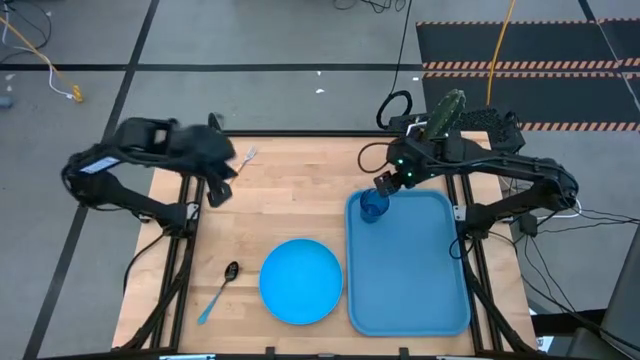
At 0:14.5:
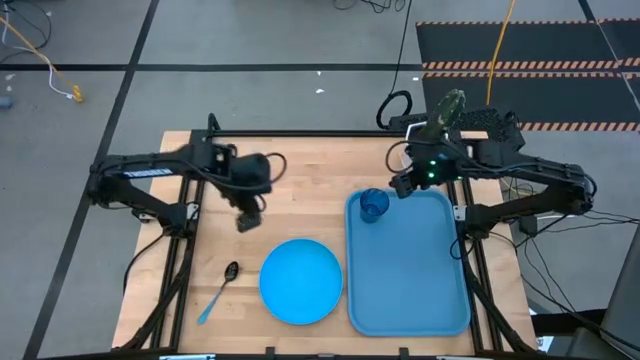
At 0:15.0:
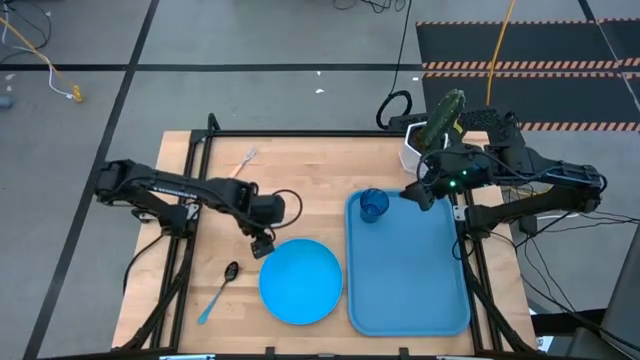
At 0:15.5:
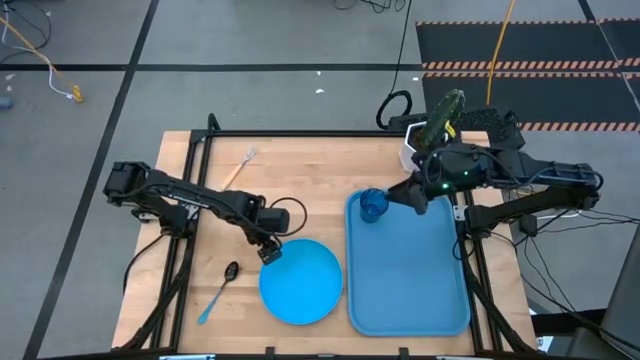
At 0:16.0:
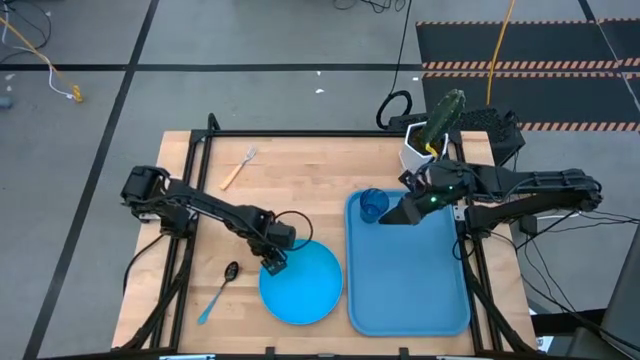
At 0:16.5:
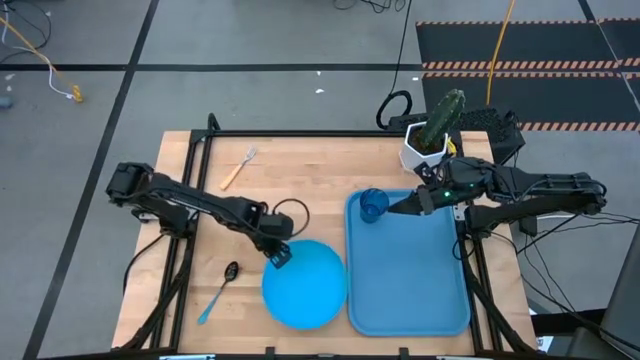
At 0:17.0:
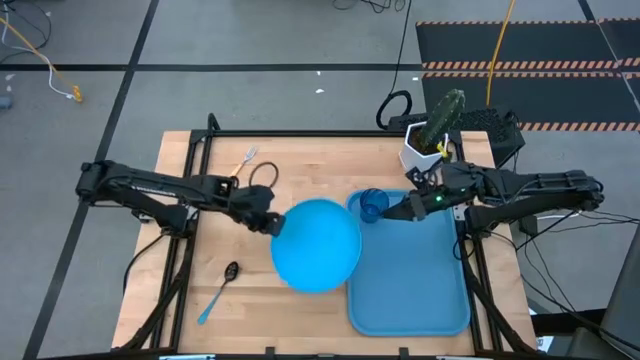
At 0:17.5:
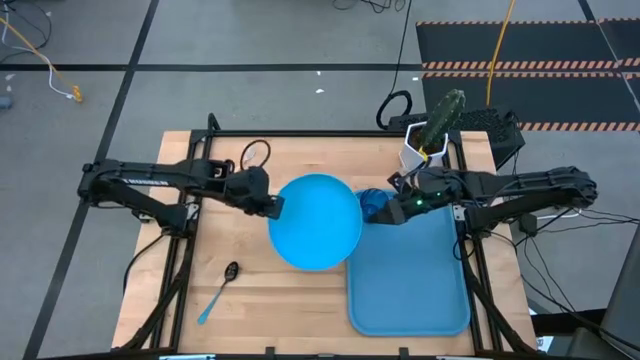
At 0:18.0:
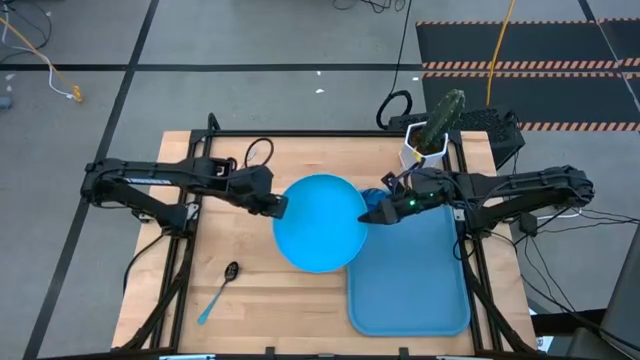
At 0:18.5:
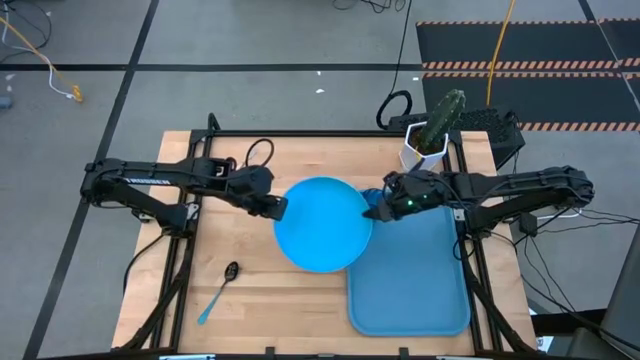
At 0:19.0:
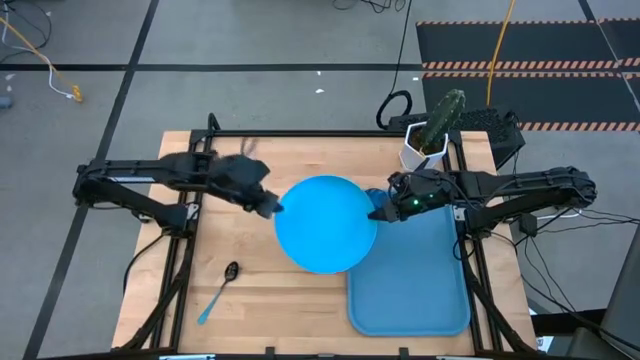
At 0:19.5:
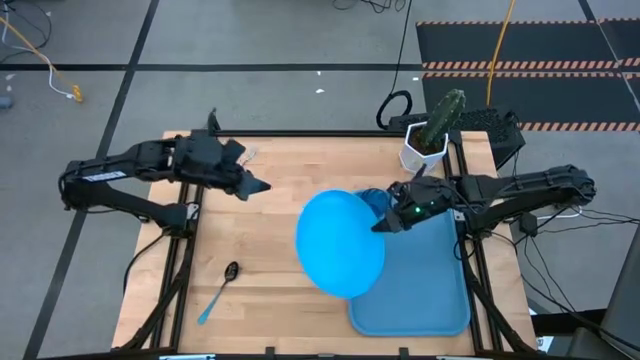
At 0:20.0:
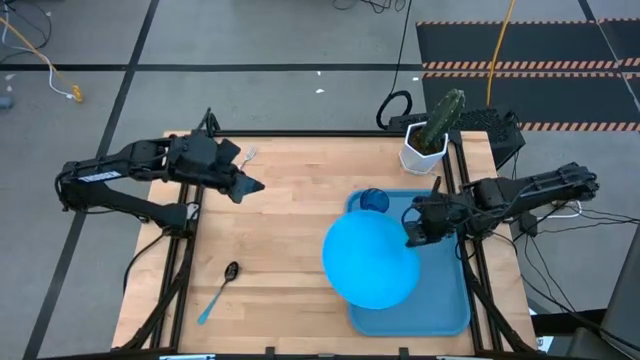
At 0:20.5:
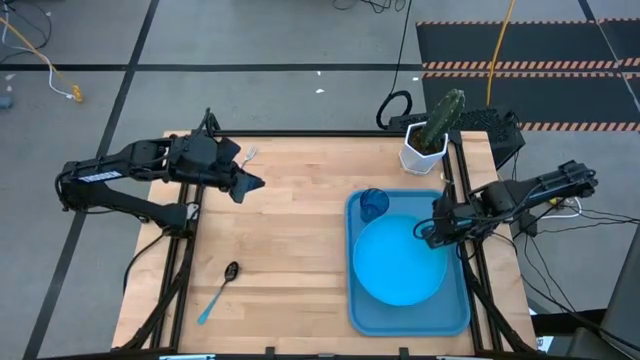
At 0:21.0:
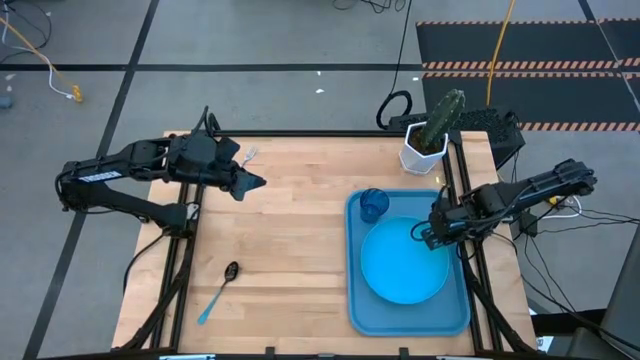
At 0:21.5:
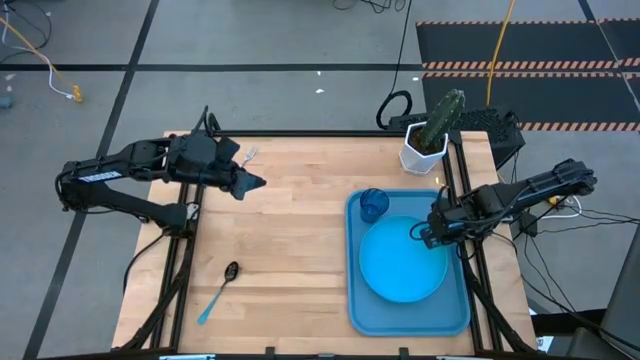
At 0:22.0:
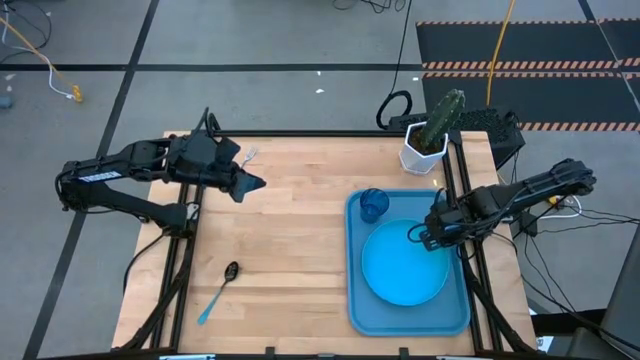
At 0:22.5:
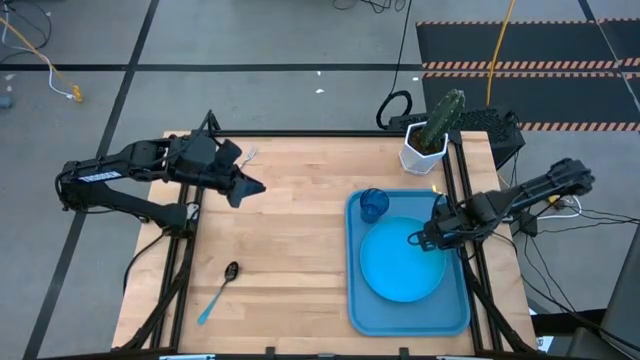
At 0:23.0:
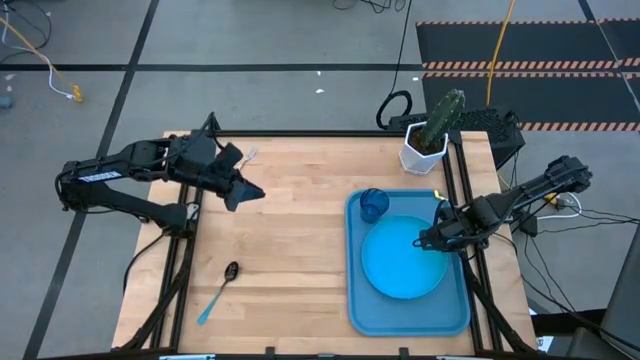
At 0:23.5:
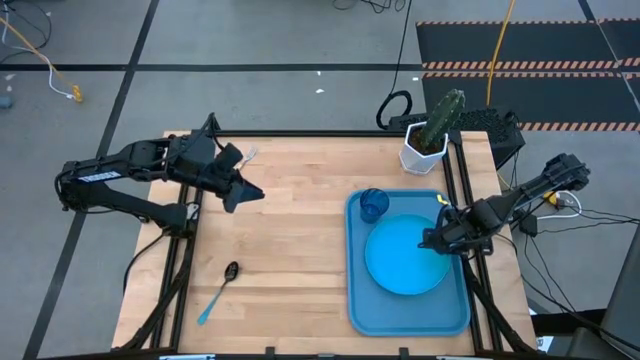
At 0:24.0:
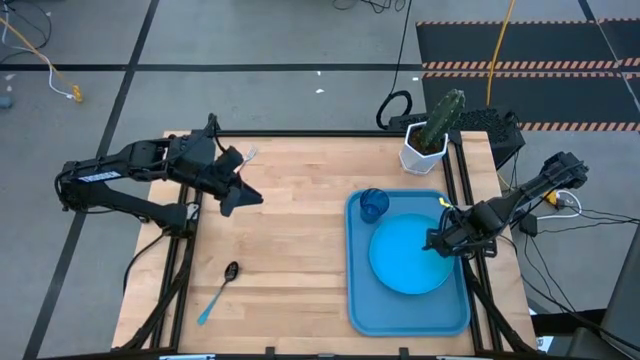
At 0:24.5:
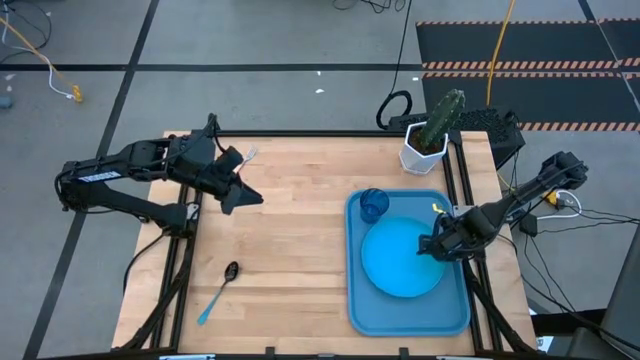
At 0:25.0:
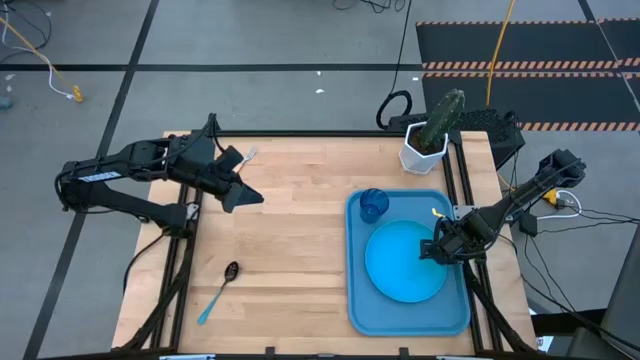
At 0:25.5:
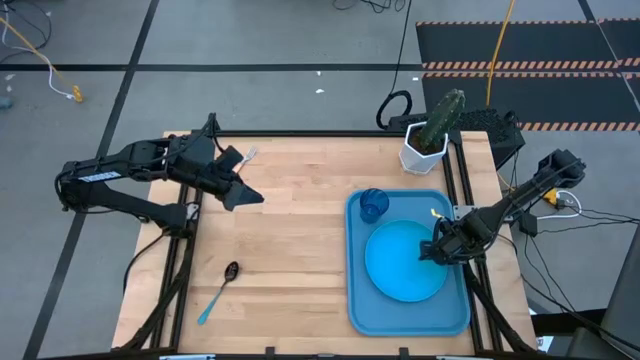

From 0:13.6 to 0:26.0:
Task: Pick and place plate/cup/fork/spoon on tray
Put the light blue plate on the blue tray

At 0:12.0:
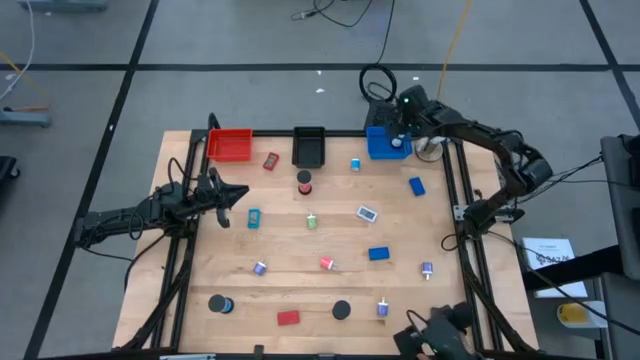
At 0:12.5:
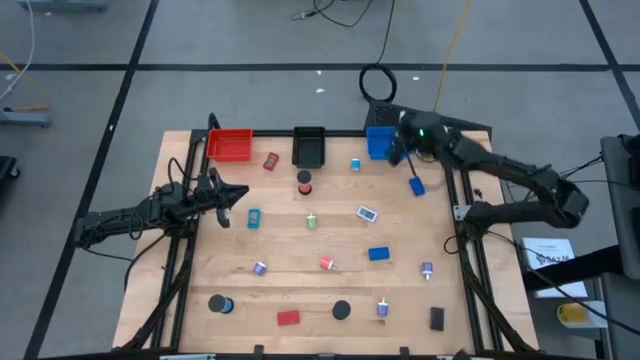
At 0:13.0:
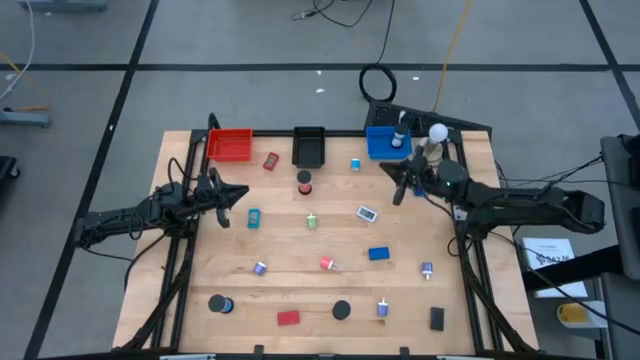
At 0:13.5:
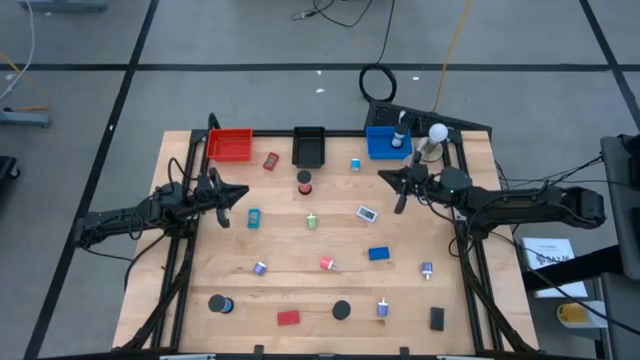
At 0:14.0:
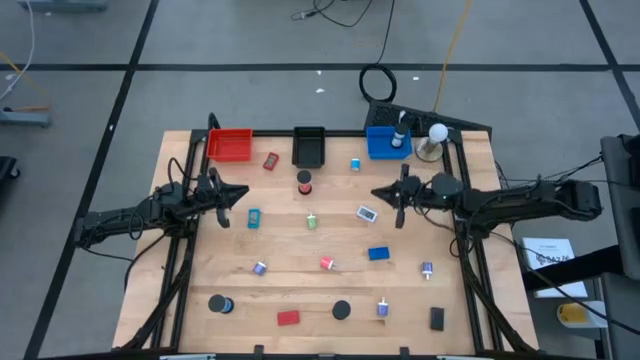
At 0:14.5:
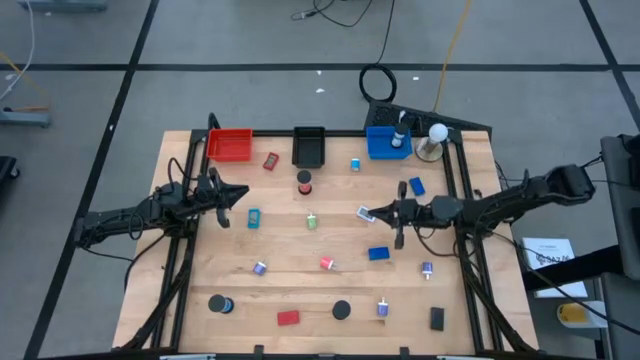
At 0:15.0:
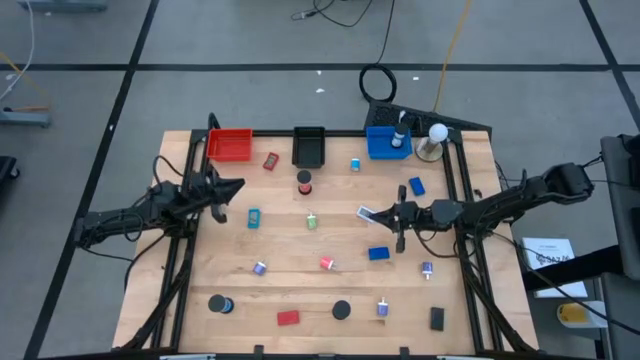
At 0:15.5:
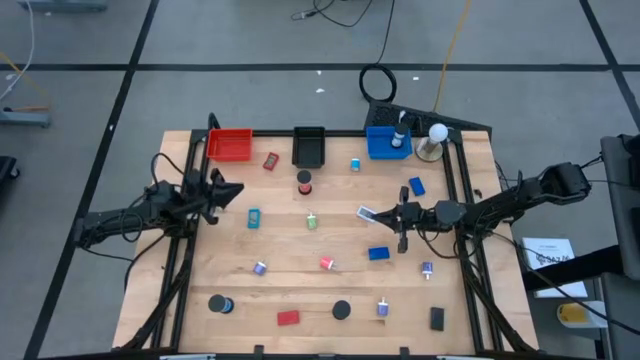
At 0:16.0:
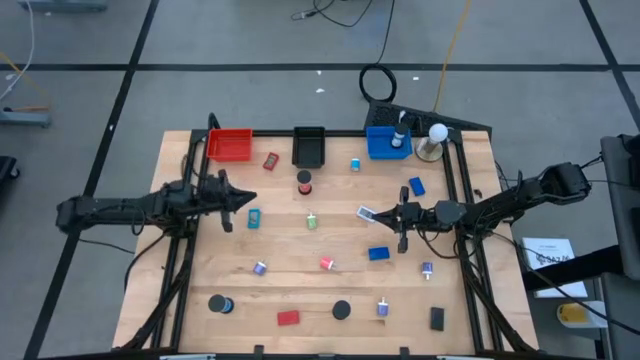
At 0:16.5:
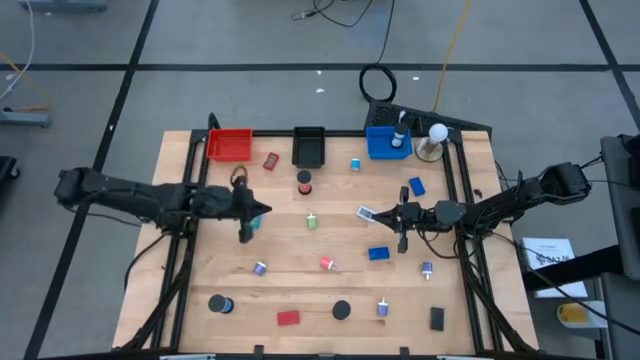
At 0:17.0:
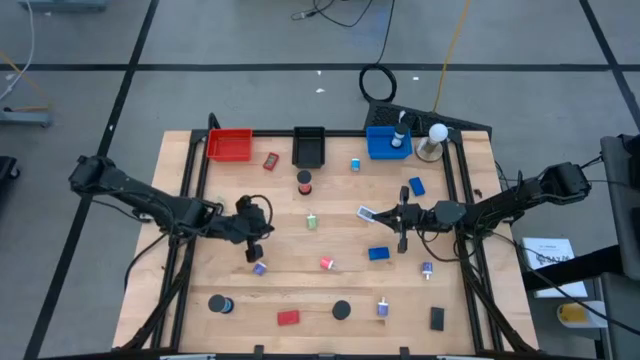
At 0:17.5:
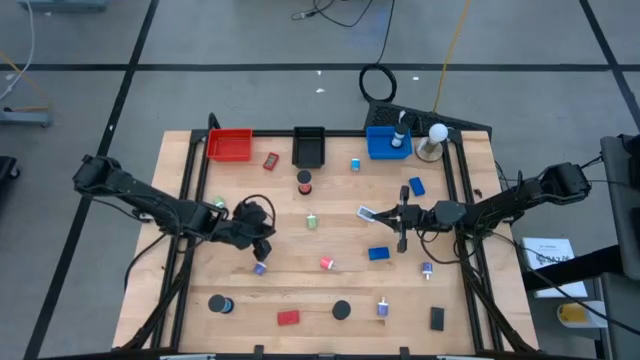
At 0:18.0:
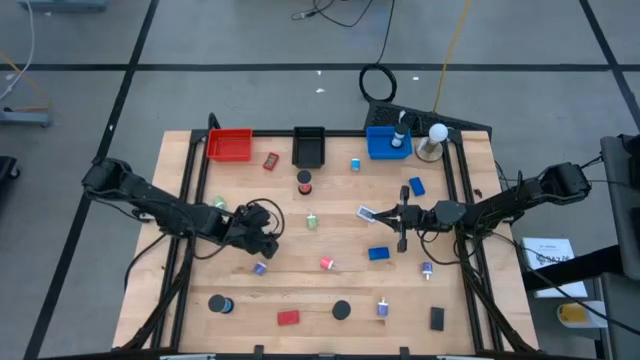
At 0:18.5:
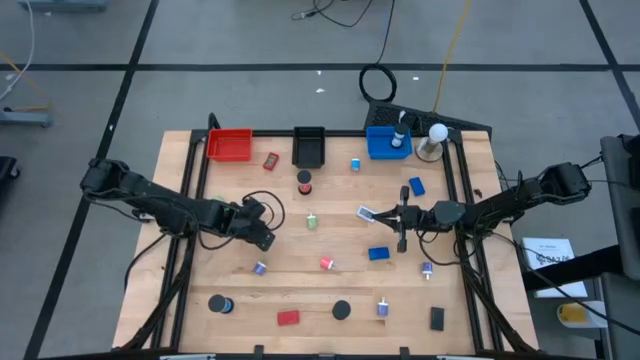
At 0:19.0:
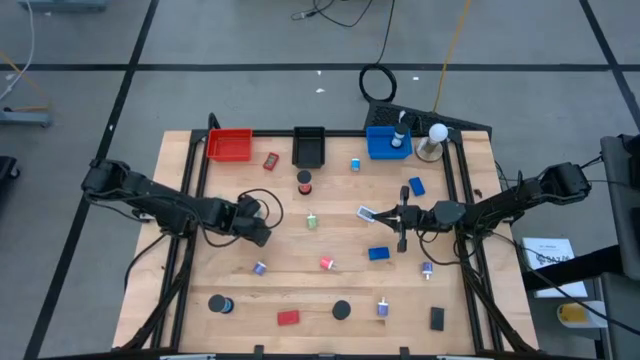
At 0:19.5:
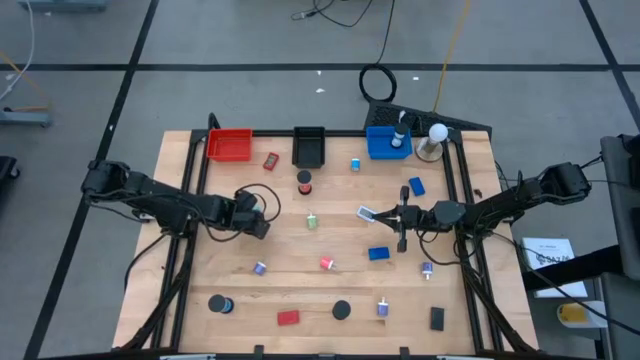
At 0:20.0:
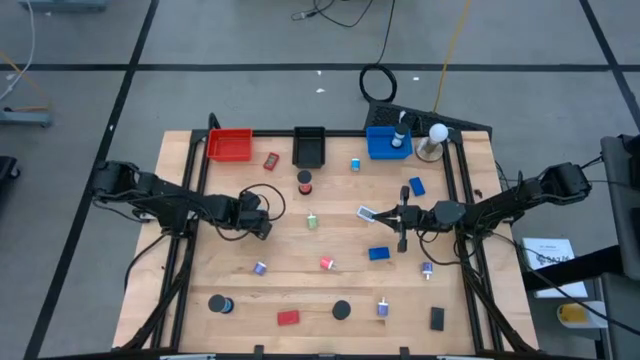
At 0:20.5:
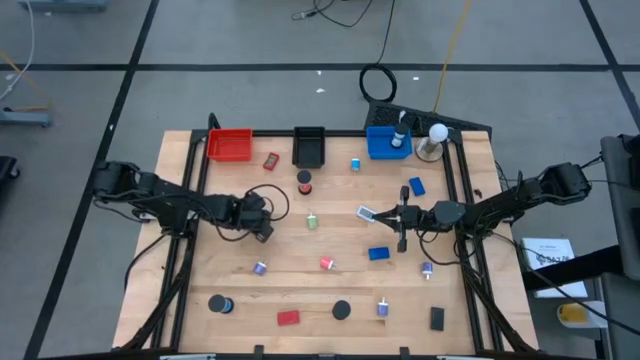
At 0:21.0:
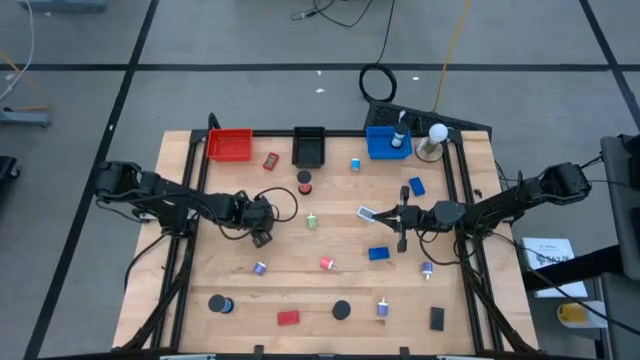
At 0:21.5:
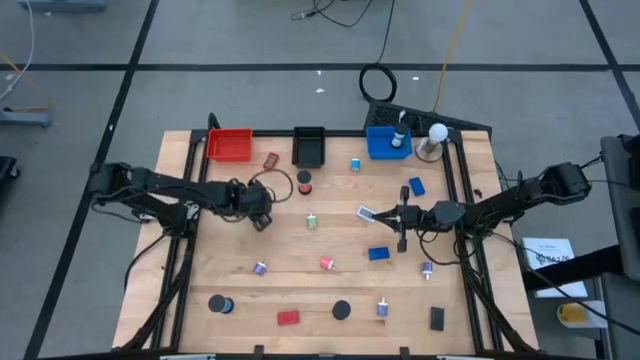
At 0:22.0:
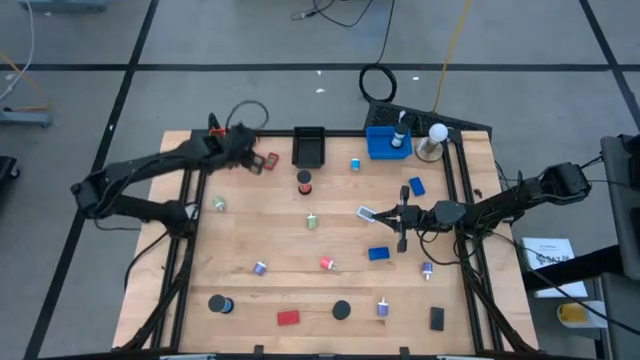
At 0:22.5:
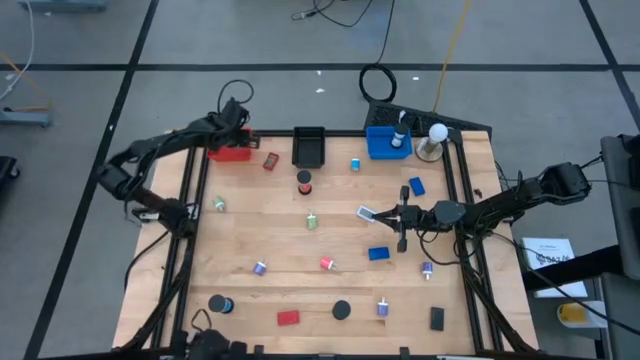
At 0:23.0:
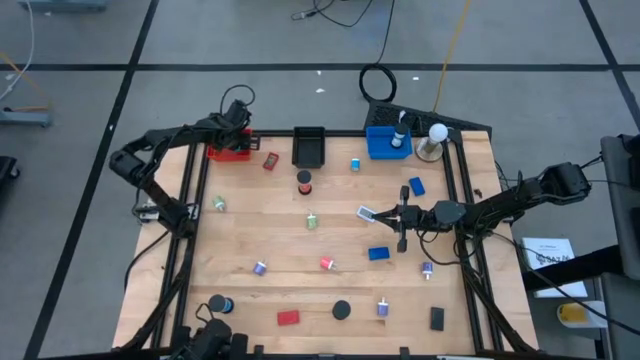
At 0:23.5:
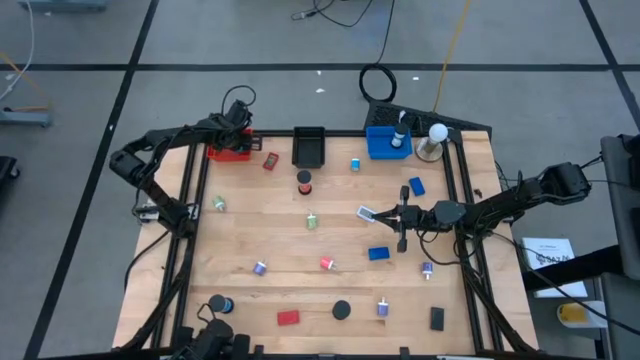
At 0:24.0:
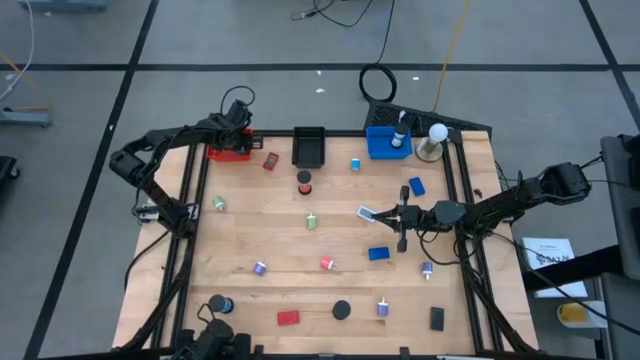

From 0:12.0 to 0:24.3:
Task: Pick & Place Office items
Put the light blue digital clock into the red bin
